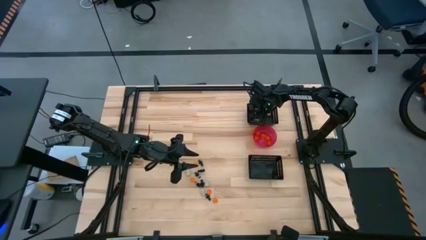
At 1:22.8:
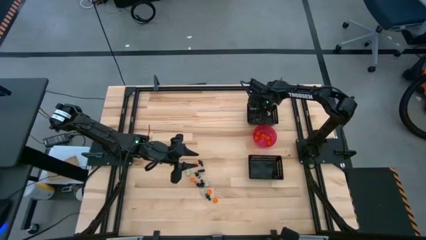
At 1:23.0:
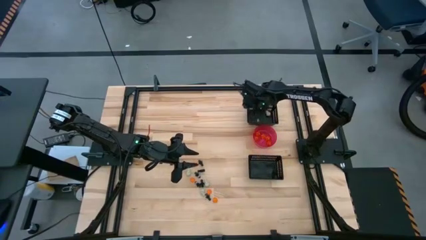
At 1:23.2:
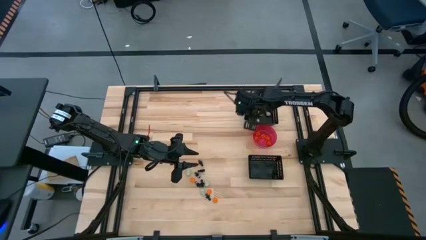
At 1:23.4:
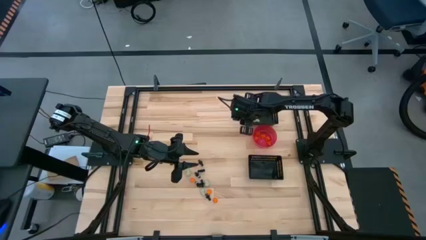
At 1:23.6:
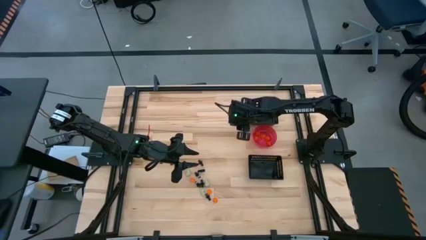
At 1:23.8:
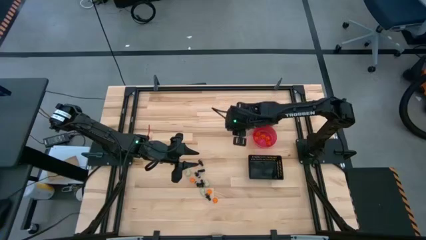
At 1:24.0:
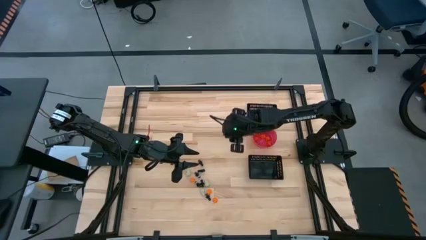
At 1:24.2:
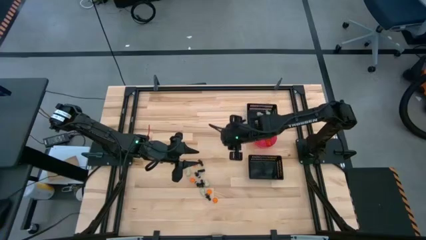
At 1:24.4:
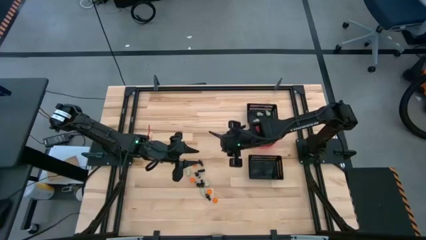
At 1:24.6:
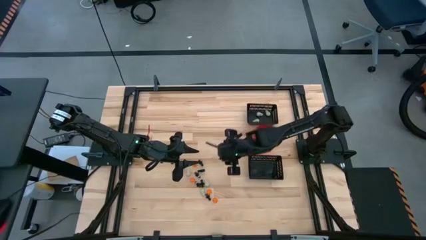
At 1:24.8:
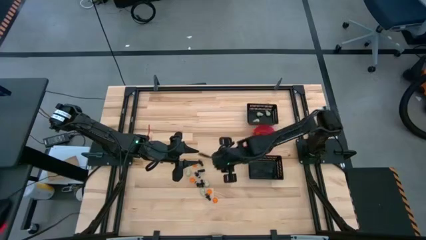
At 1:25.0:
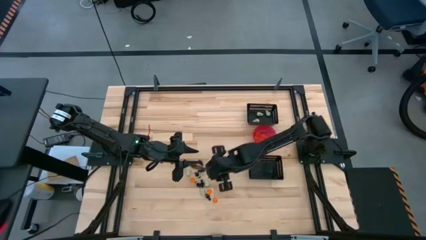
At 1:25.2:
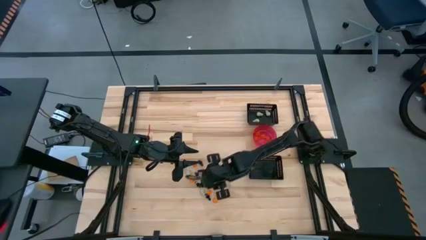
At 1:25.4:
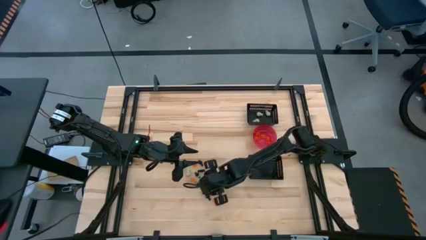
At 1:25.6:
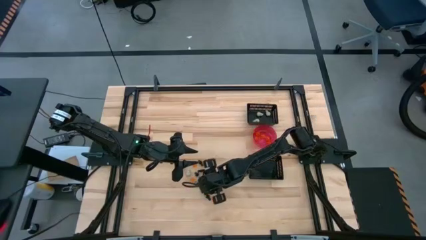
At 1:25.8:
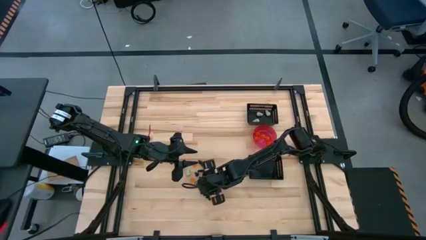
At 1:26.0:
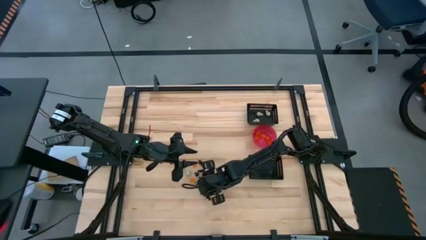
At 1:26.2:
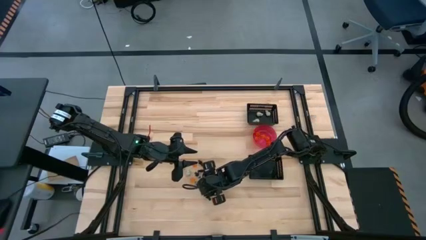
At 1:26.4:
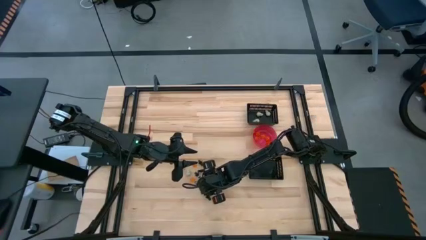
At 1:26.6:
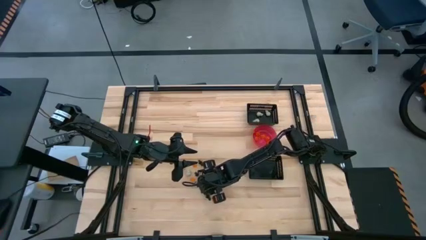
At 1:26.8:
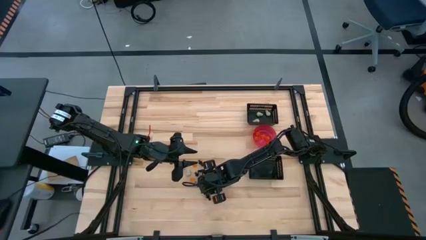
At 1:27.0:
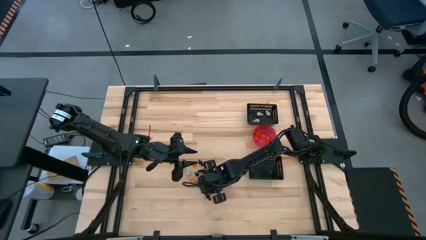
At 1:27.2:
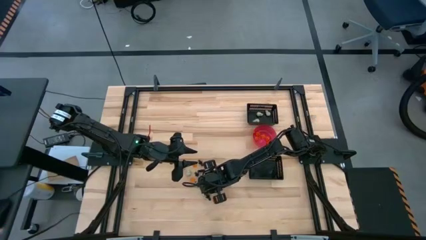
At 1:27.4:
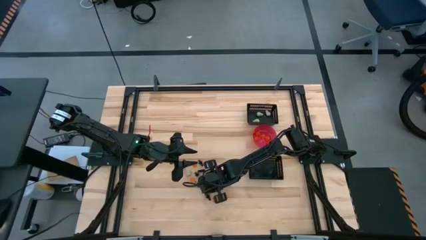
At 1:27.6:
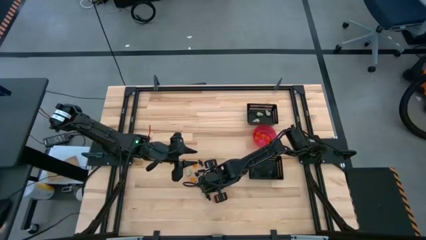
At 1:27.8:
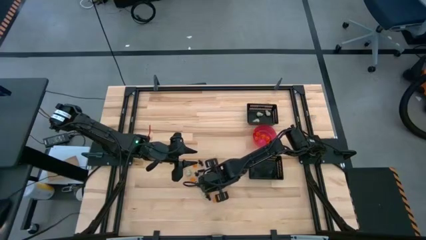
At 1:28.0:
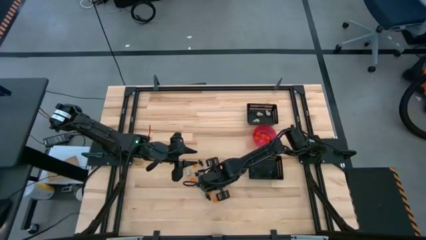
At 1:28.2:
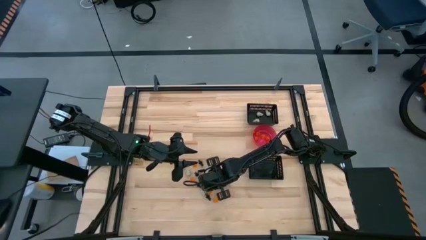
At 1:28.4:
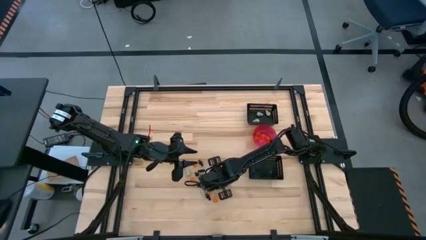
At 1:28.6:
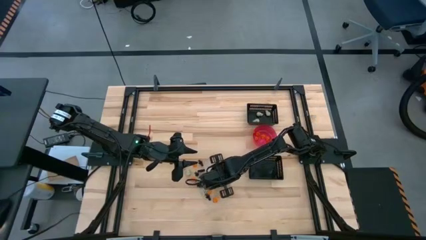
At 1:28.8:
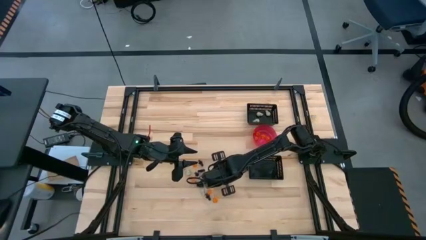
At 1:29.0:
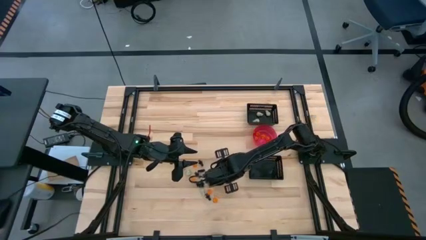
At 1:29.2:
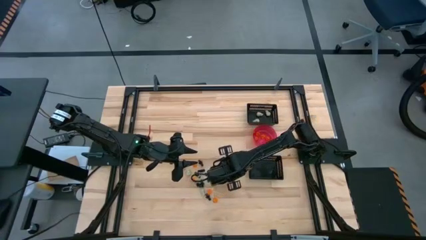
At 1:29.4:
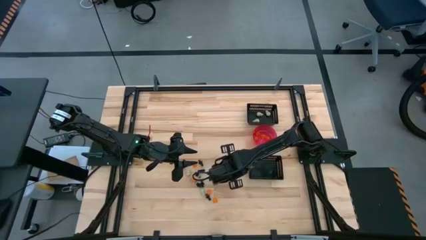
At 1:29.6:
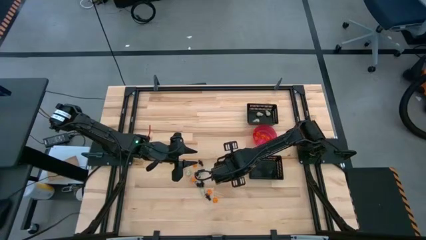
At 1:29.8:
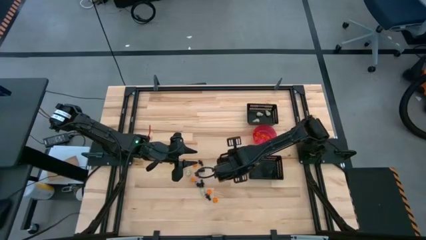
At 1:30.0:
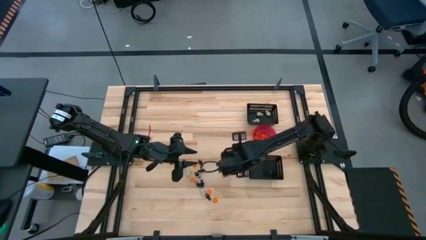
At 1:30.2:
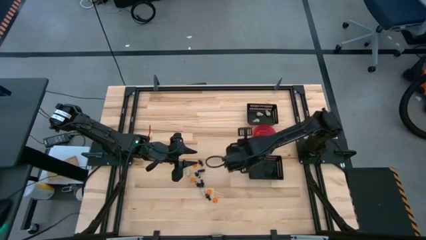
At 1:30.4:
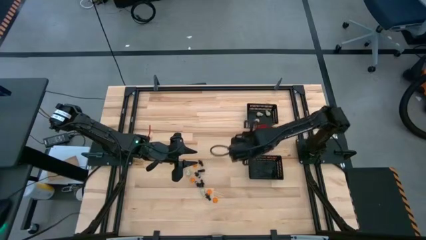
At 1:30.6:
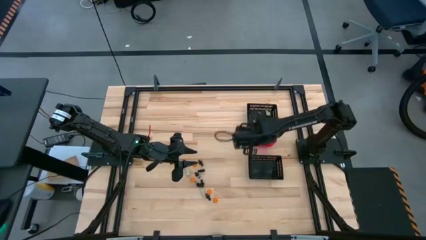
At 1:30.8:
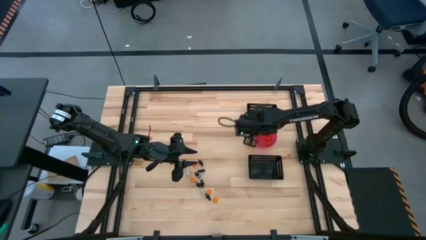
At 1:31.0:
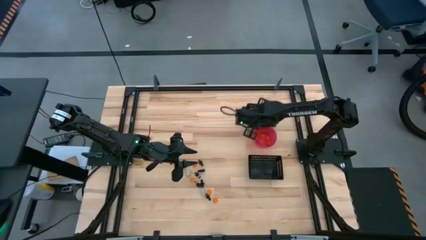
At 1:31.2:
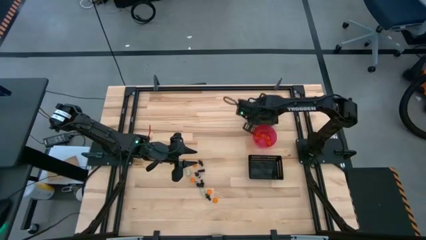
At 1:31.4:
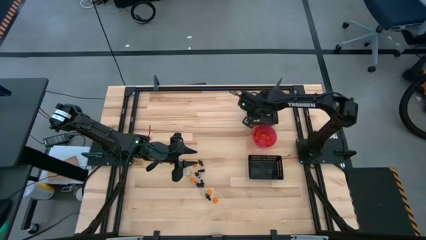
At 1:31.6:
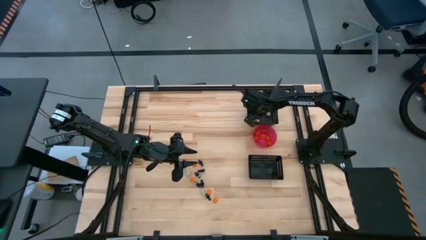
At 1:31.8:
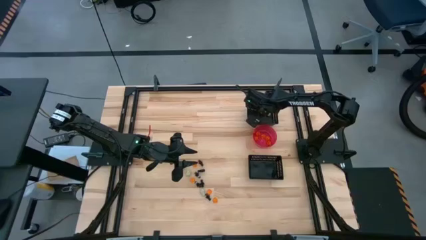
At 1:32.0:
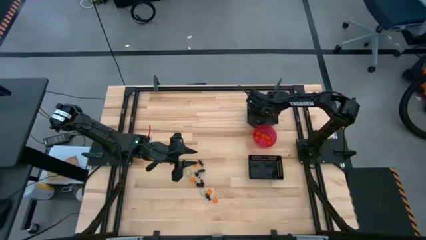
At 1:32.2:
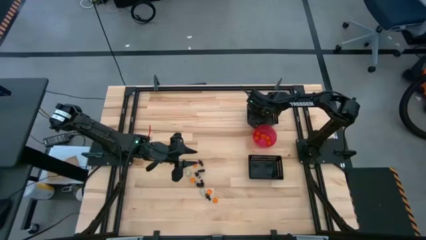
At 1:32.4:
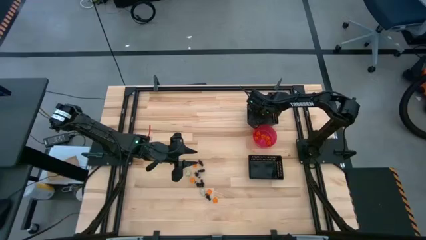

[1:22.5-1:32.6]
Task: Sort Halloween decoration
Put the white skull toy into the top black bin

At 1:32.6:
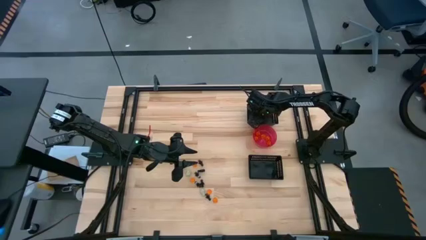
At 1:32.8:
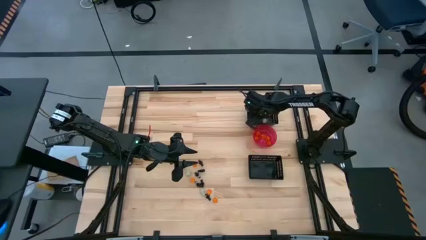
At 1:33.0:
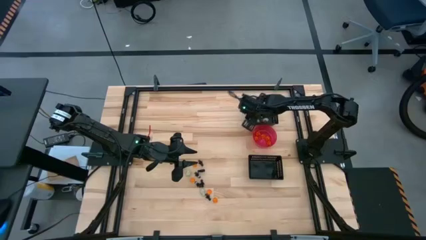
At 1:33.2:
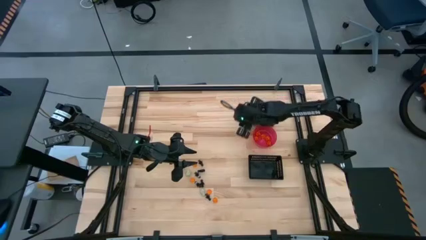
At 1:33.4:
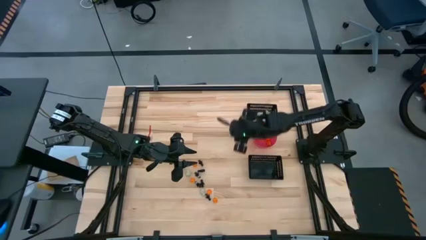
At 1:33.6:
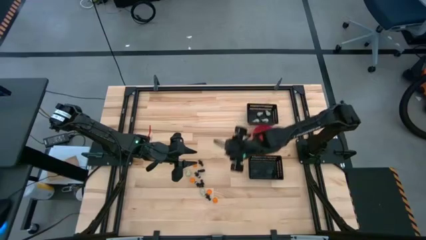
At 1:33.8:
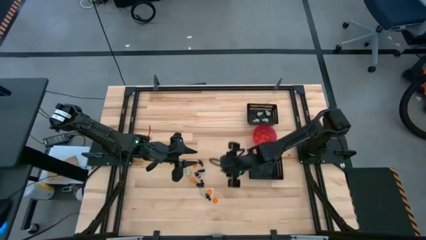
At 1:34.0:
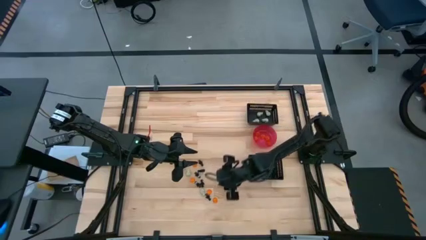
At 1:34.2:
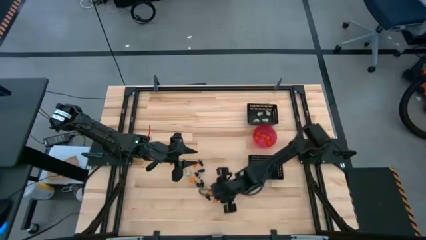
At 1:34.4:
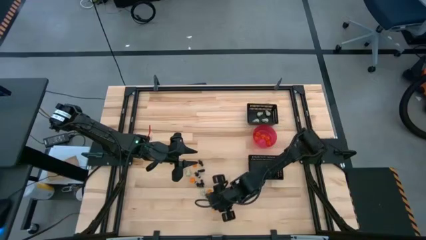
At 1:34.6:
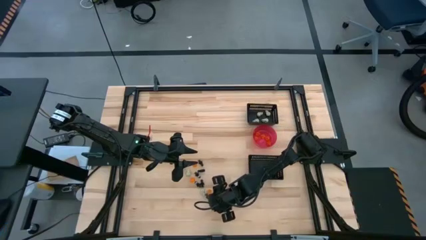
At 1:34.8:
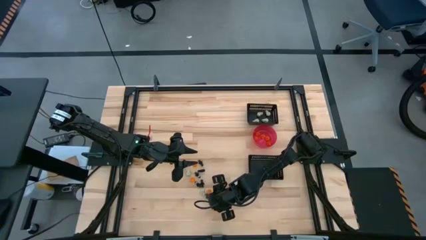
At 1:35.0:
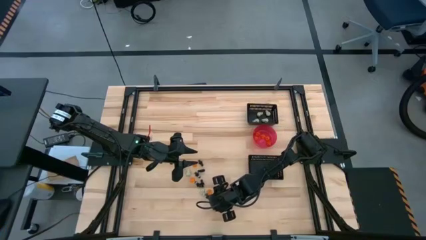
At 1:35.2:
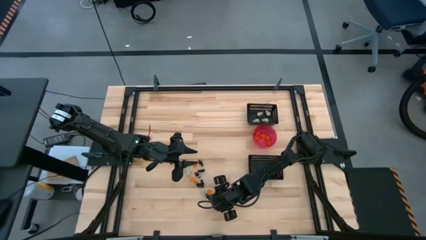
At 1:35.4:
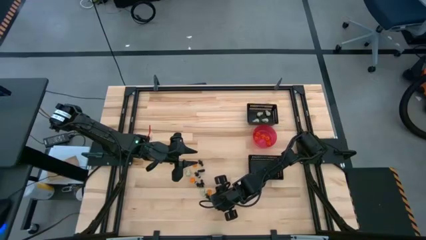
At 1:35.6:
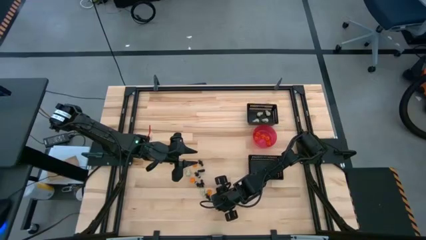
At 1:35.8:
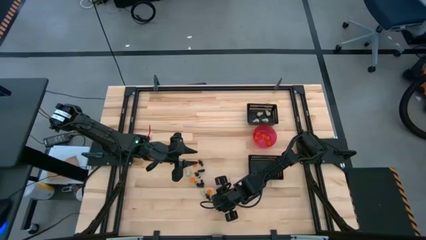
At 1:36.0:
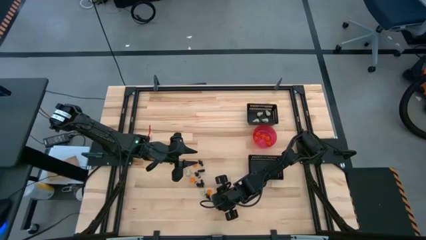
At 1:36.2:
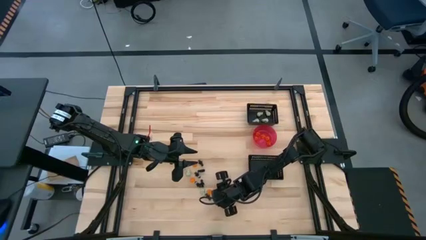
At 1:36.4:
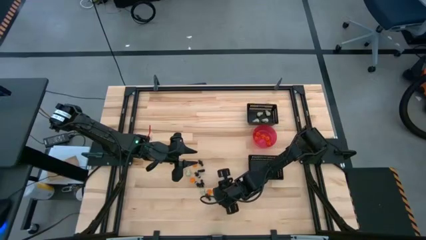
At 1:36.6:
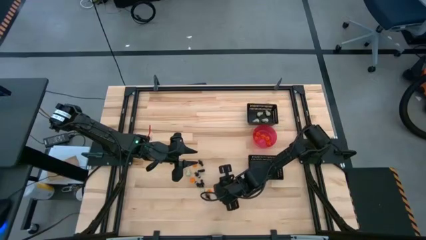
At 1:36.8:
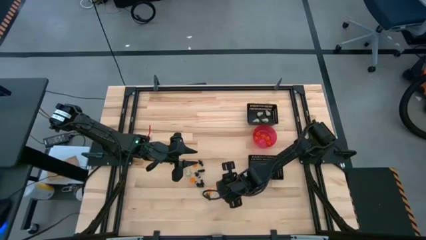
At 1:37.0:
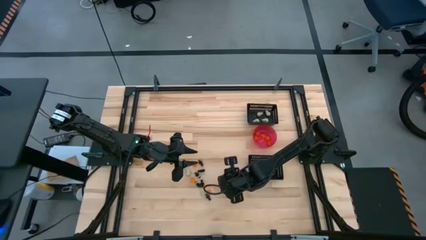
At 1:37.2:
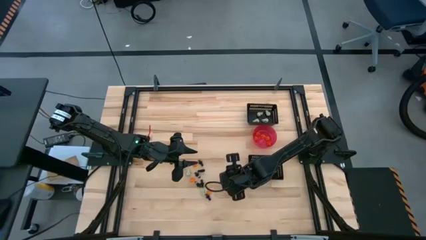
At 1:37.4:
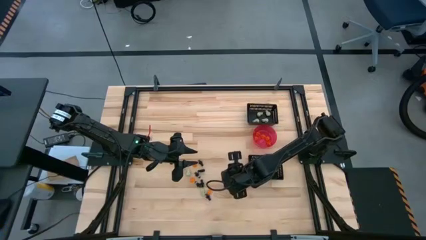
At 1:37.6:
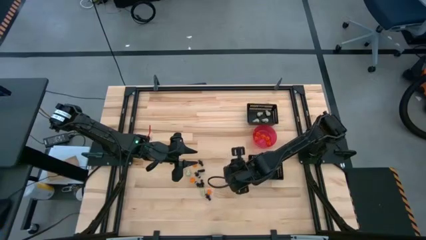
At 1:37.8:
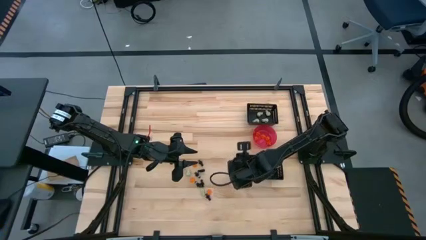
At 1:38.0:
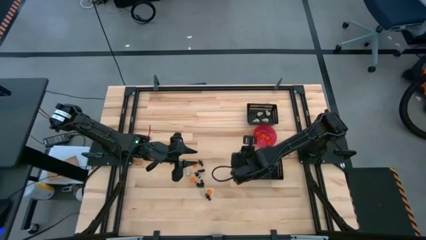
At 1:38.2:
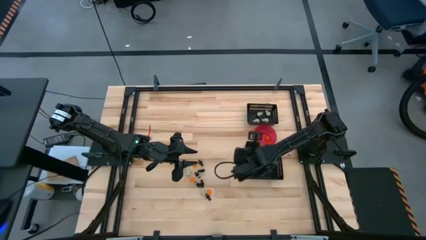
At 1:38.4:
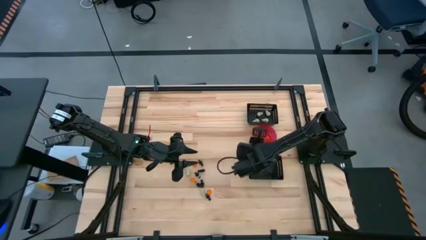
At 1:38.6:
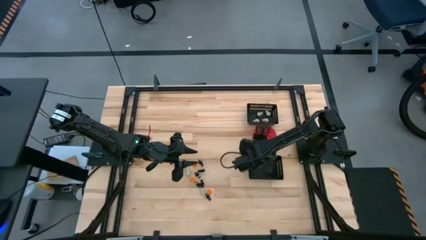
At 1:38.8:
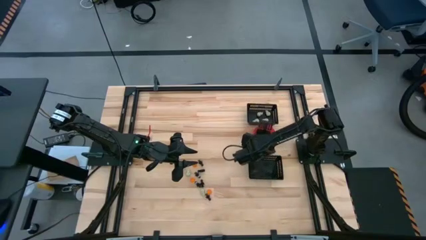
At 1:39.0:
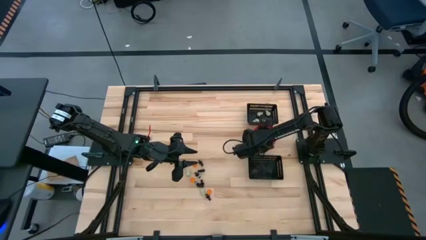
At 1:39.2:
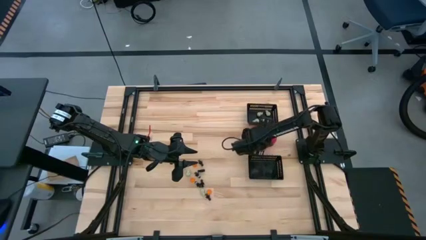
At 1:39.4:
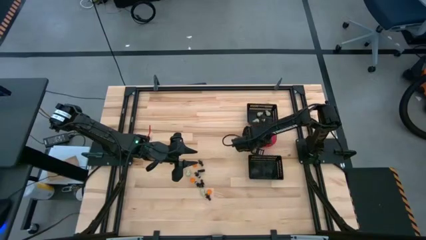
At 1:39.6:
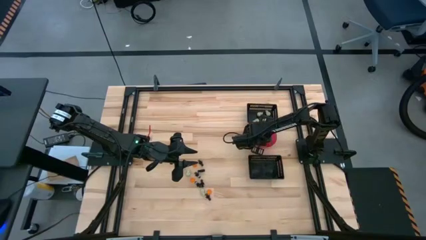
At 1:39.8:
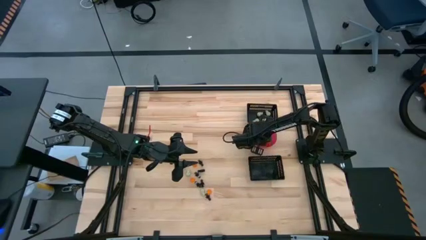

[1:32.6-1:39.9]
Put the orange pumpkin toy into the pink bowl
